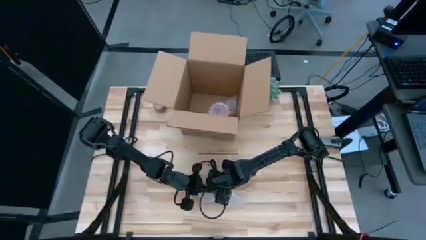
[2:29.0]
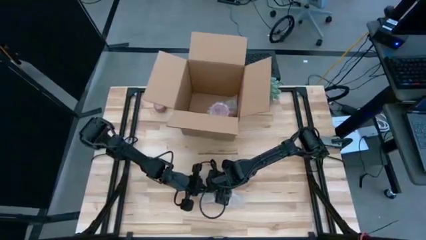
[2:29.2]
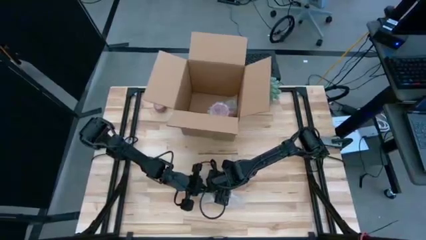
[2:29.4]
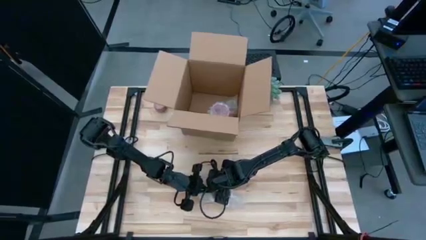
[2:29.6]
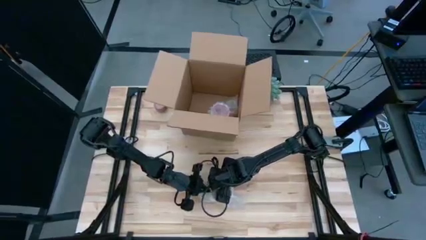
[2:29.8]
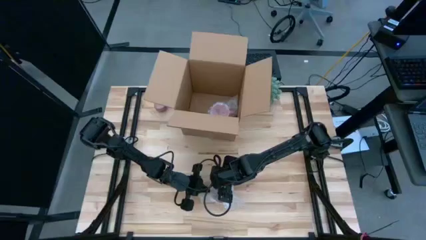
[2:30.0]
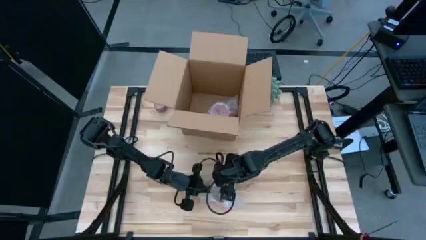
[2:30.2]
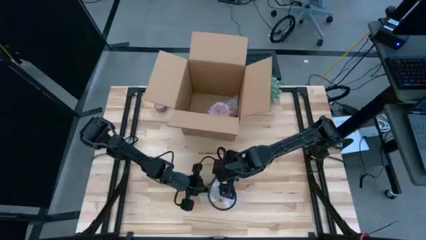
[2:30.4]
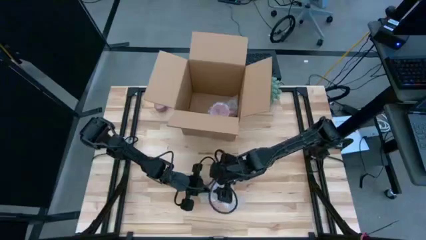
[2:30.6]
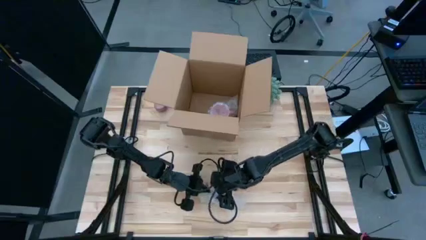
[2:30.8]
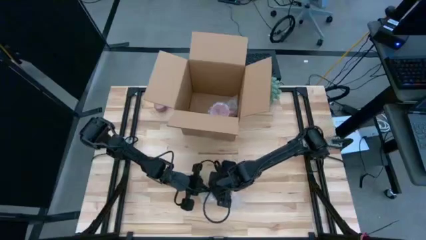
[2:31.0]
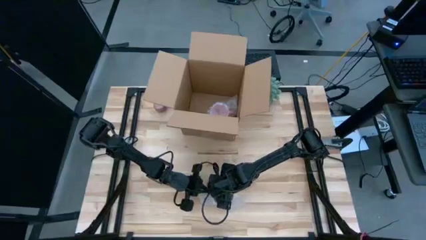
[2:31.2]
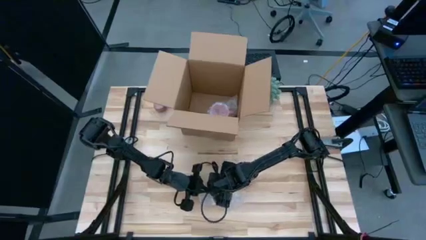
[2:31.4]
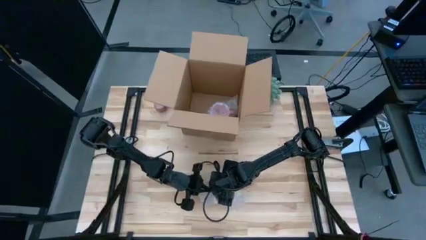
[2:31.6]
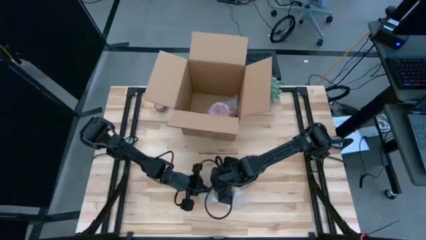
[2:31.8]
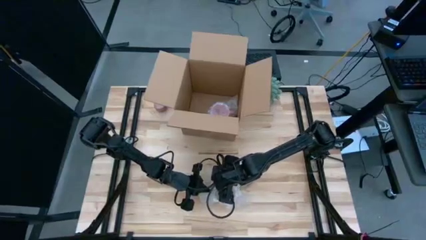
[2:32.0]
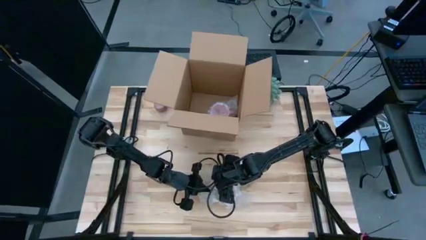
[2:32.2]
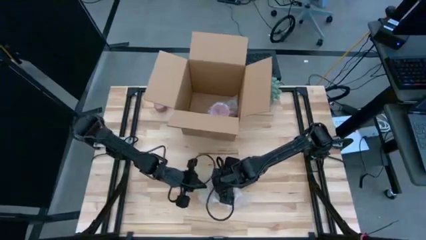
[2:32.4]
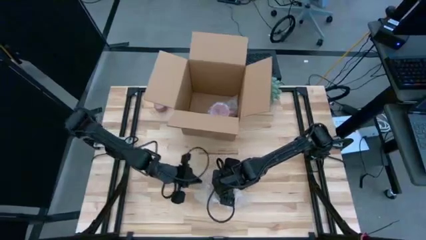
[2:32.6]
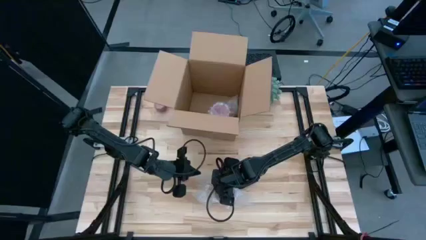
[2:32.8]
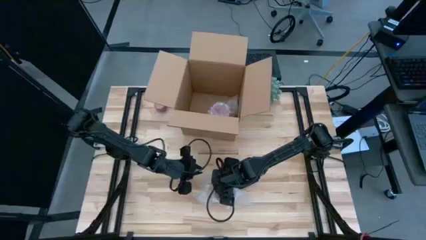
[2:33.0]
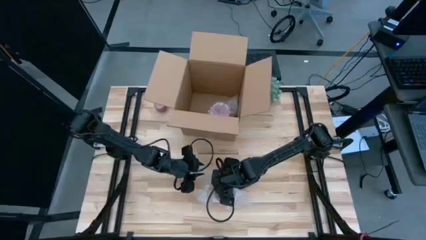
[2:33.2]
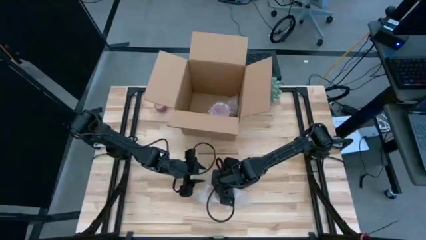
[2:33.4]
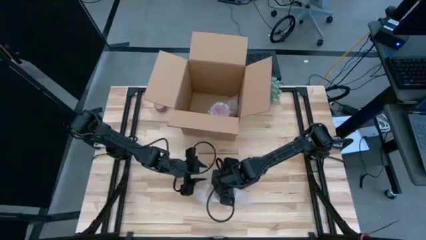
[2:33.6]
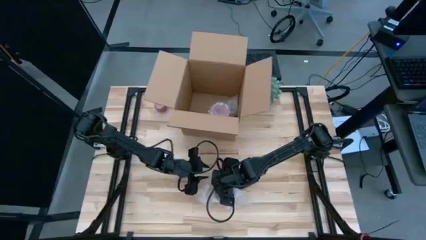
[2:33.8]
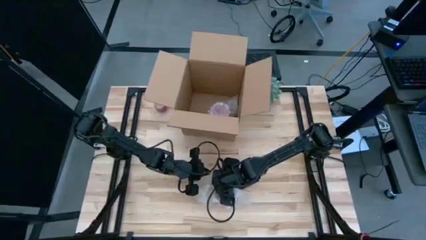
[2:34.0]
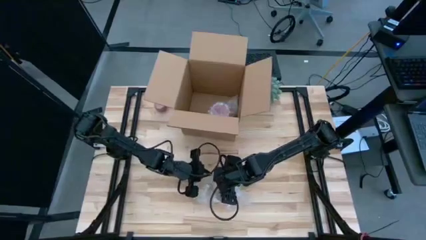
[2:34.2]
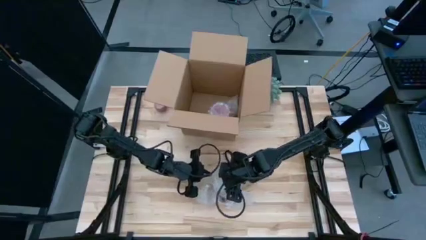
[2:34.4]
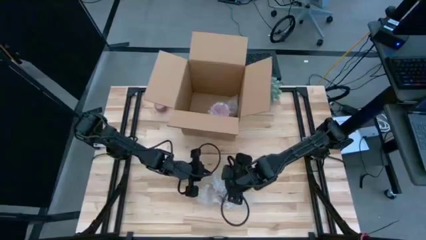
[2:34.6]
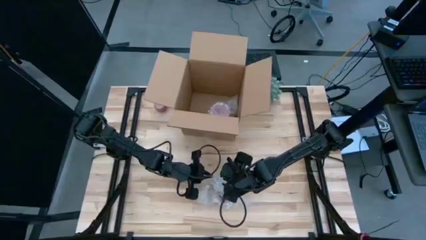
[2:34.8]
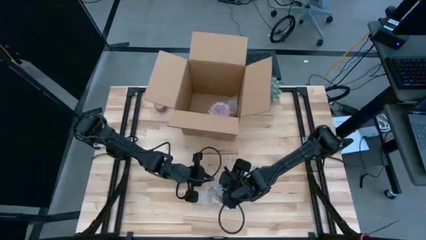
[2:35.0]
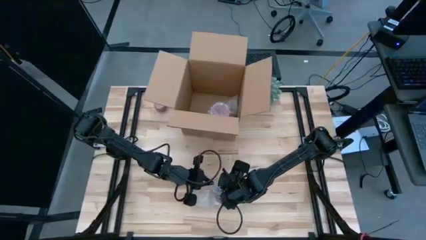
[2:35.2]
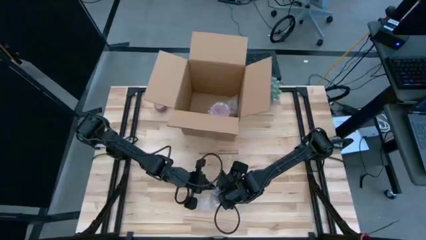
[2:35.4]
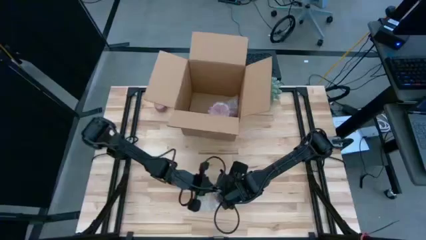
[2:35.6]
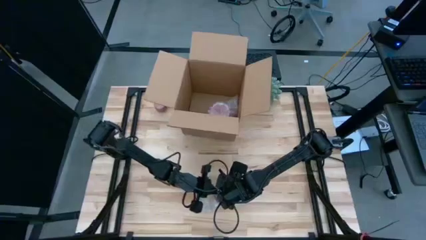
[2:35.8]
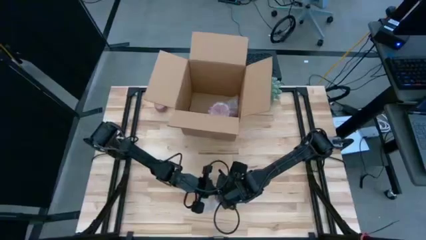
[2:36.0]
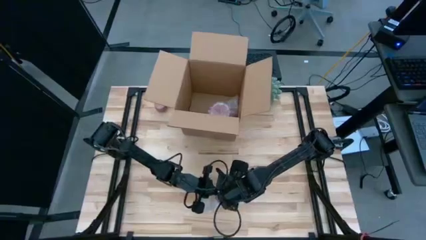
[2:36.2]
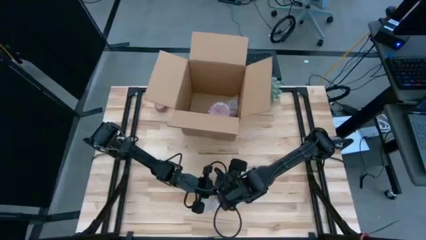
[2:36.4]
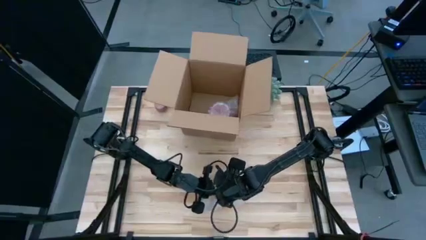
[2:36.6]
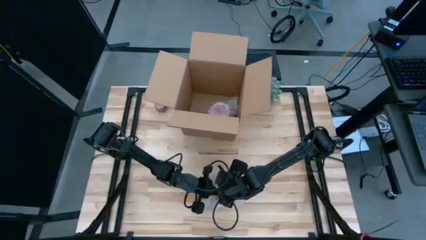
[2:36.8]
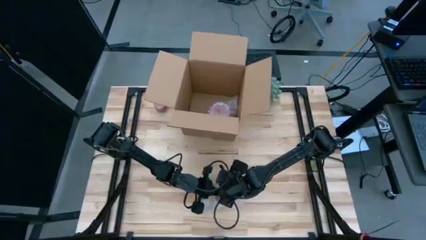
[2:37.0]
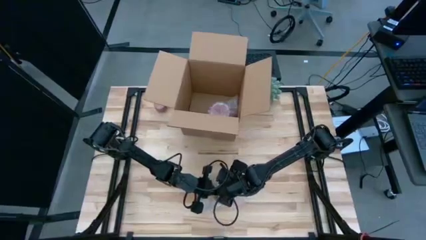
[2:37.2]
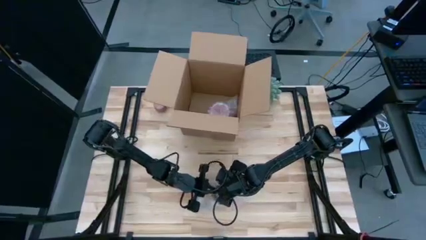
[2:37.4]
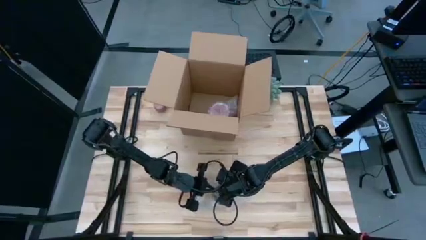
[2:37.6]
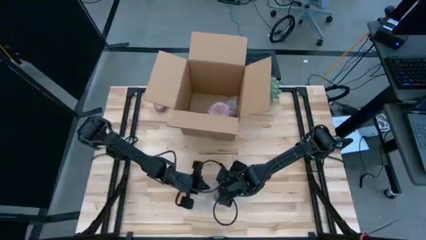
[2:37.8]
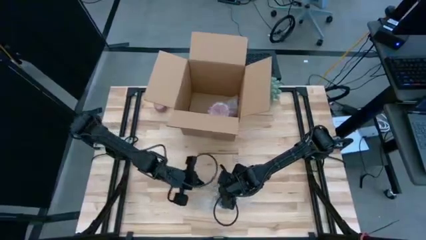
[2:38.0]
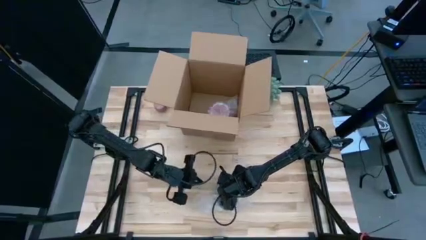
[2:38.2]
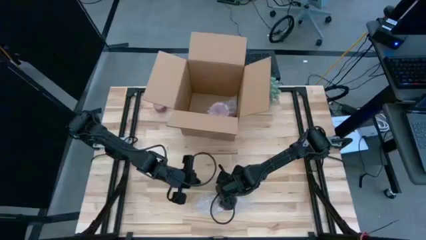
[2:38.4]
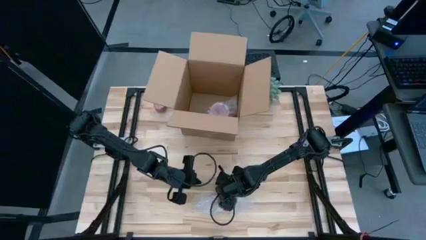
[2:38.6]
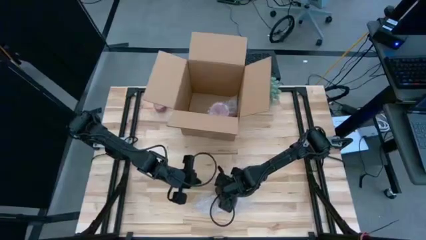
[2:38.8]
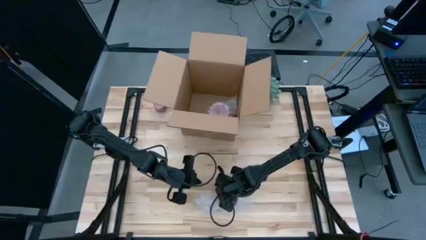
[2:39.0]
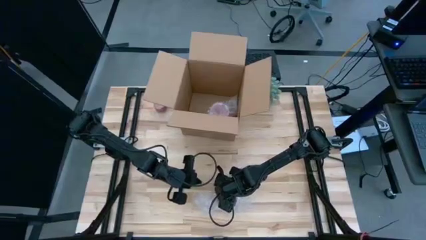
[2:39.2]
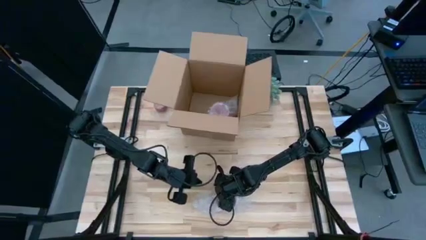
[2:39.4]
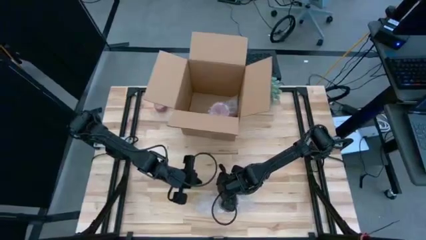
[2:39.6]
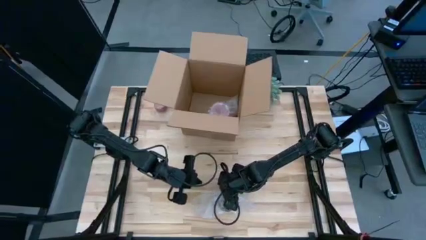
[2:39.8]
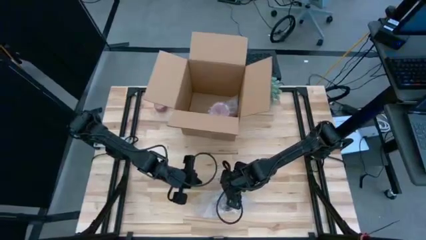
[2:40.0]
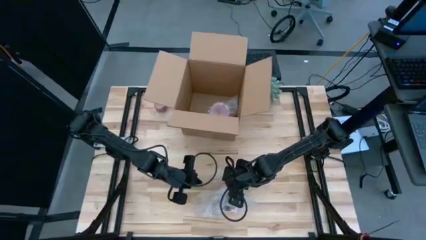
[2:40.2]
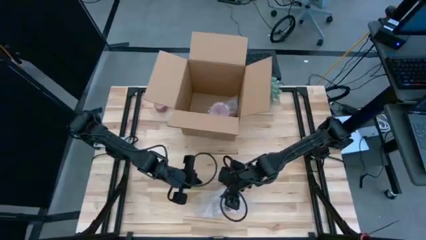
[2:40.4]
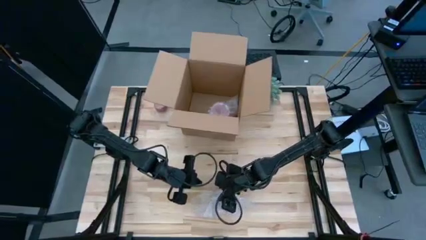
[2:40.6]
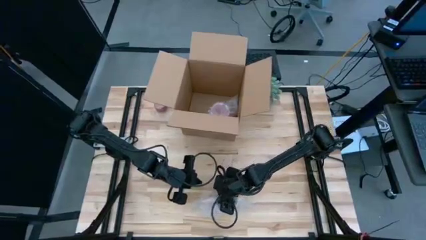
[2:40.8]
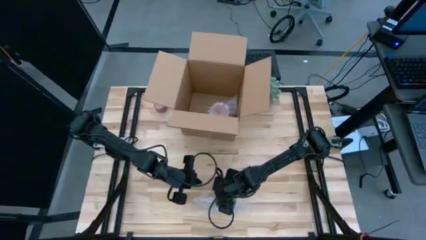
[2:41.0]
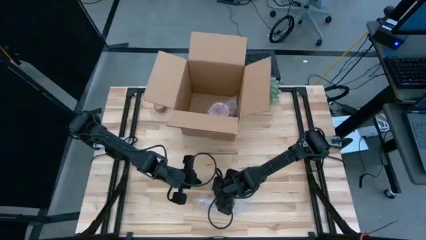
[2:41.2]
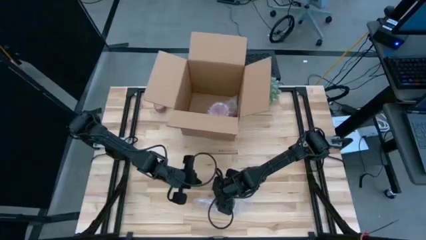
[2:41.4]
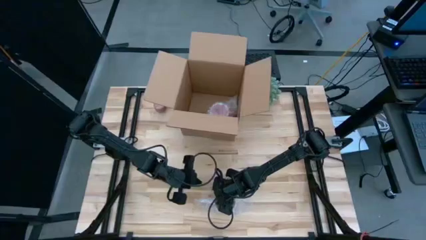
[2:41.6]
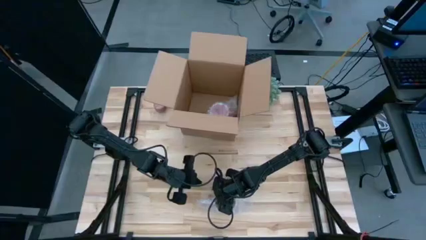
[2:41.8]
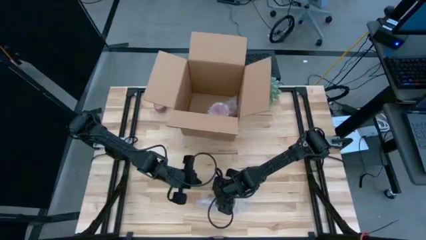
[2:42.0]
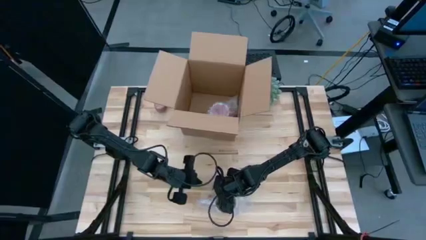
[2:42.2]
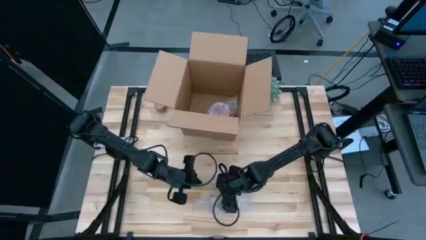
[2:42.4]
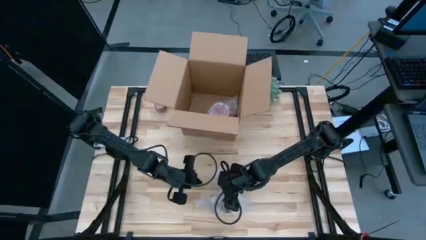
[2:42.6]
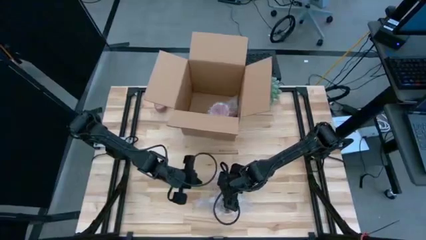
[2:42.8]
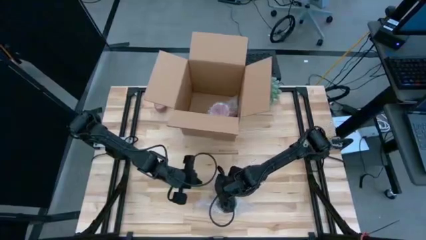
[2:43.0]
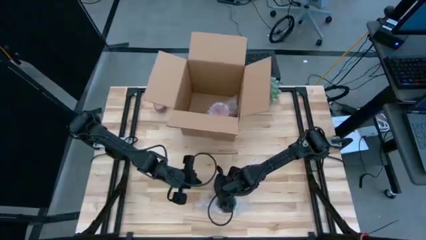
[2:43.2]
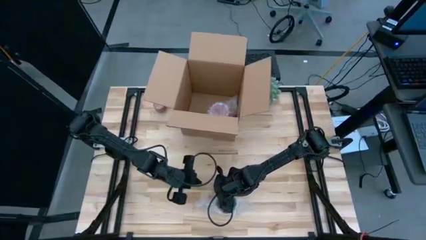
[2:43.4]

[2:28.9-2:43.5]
Task: wrap mug
Wrap the orange cup with bubble wrap

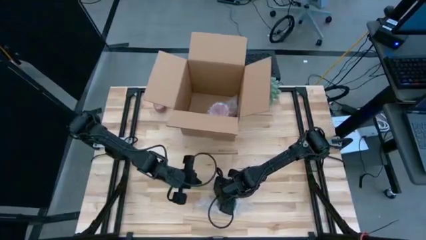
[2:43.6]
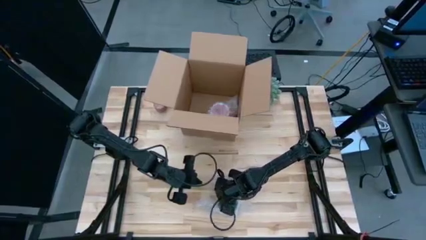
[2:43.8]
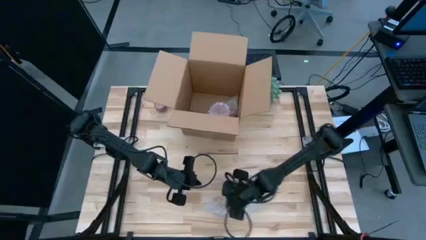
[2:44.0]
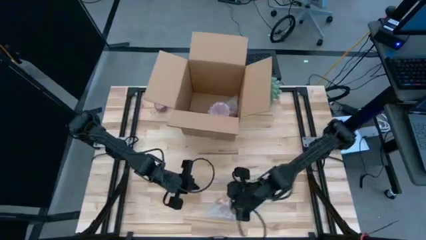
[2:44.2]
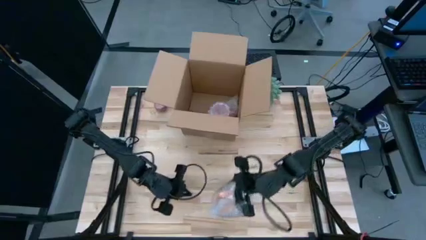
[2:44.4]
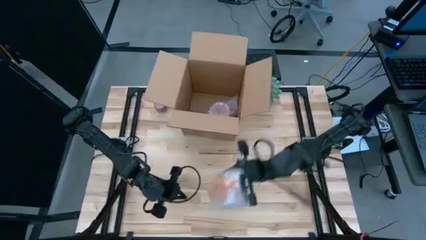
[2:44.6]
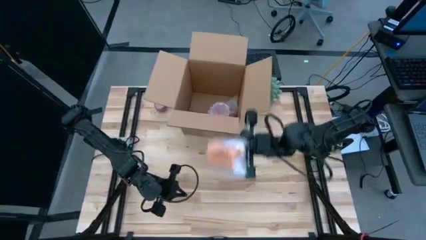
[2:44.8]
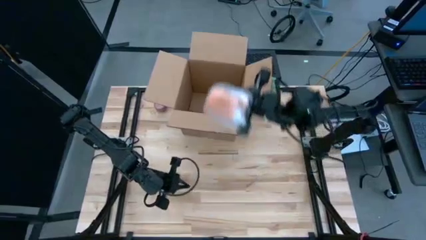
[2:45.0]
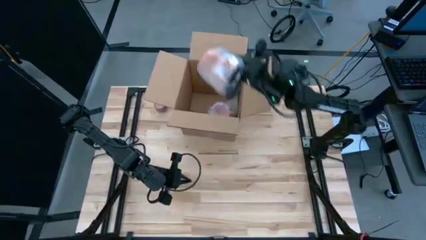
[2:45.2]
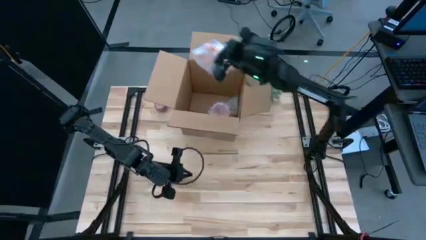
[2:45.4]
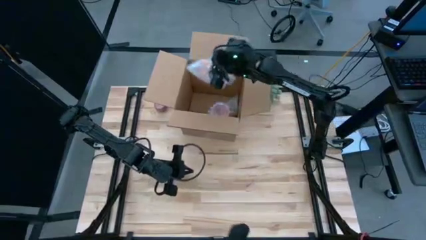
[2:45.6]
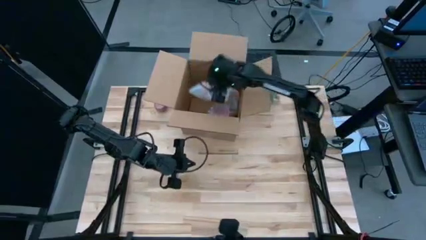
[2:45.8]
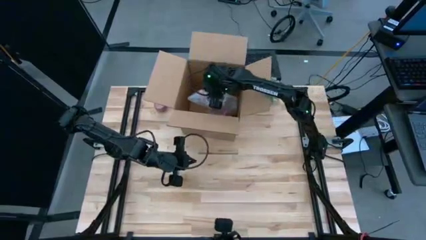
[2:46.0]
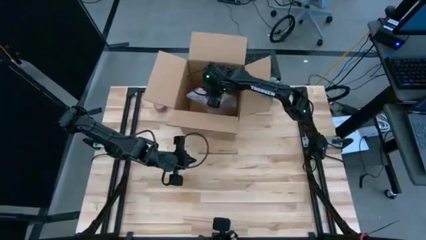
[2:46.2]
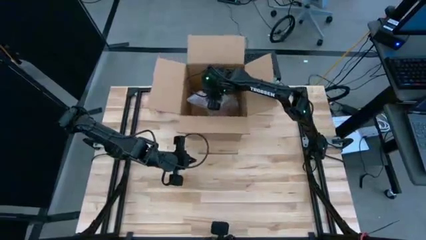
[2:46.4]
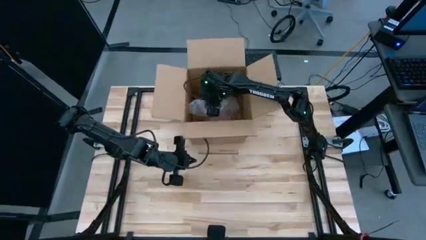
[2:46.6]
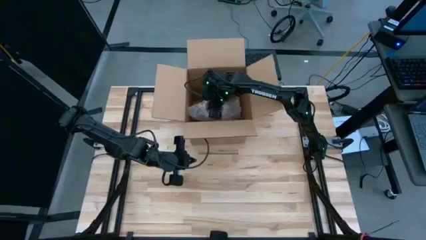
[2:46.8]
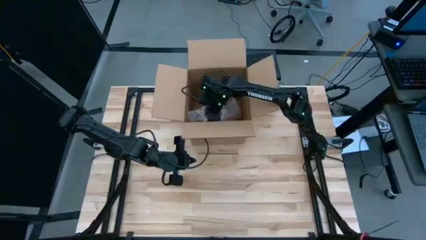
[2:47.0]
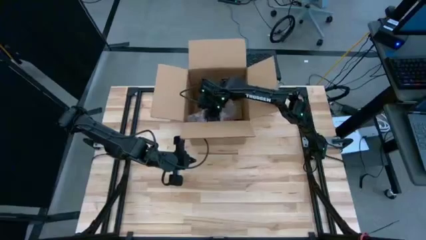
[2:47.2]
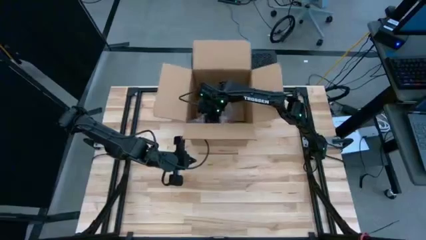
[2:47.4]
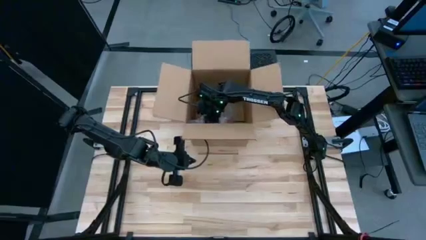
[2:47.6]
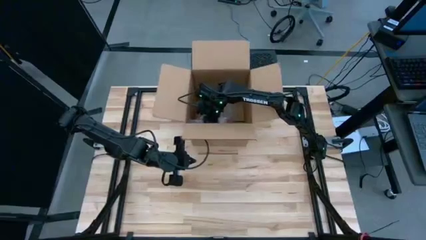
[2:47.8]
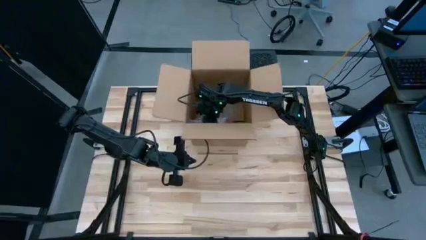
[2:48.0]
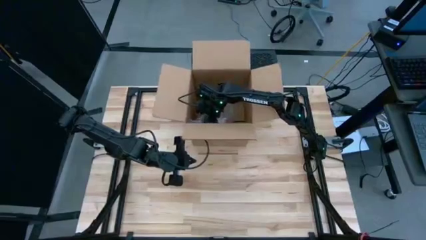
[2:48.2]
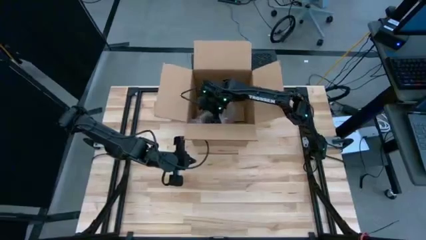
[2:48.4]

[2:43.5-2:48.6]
Put the wrapped orange cup into the box
